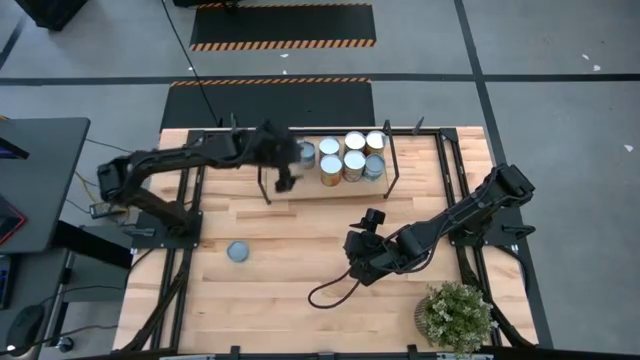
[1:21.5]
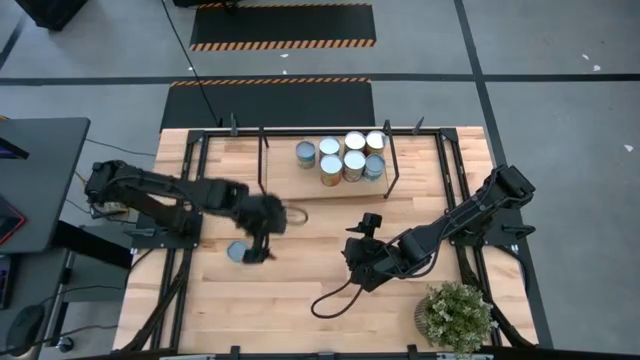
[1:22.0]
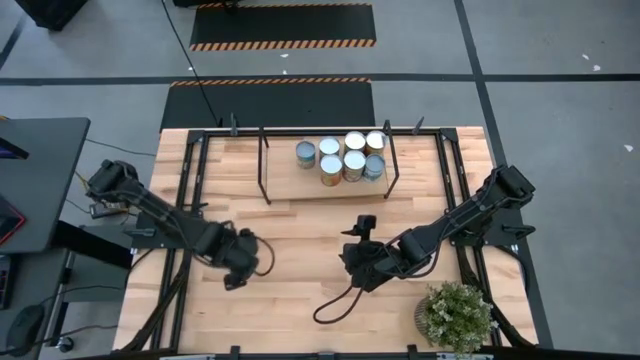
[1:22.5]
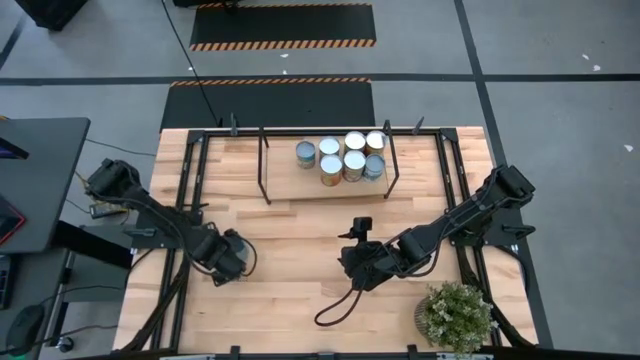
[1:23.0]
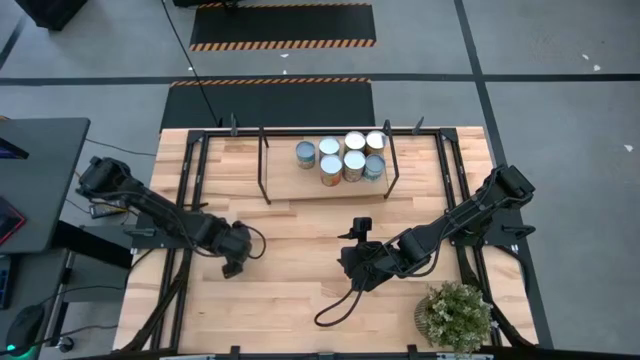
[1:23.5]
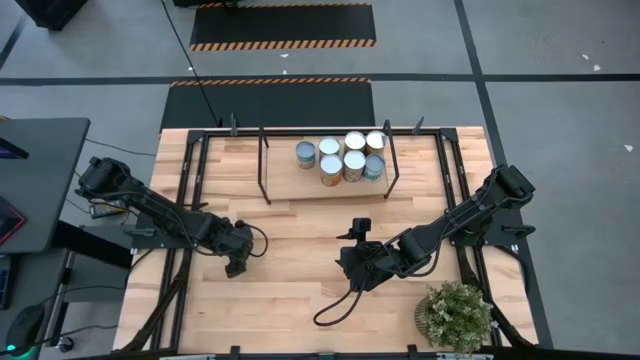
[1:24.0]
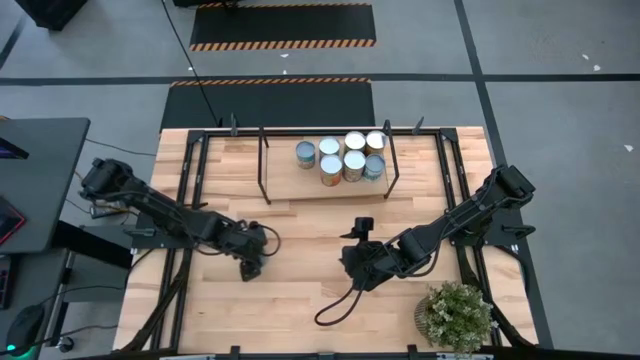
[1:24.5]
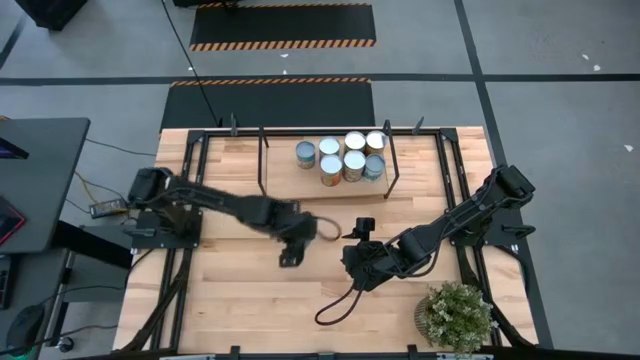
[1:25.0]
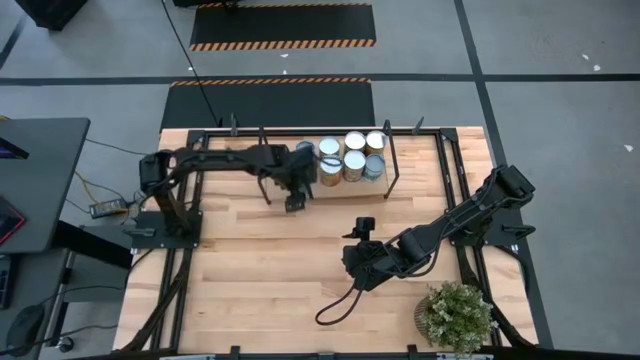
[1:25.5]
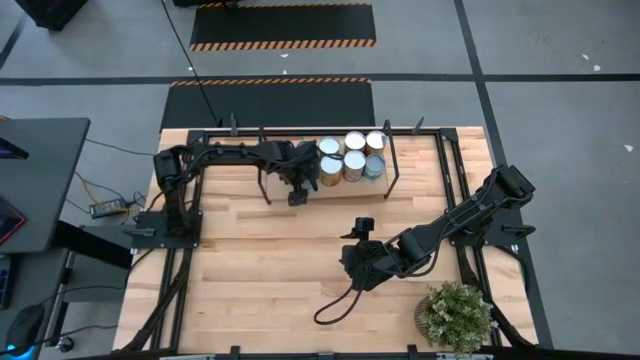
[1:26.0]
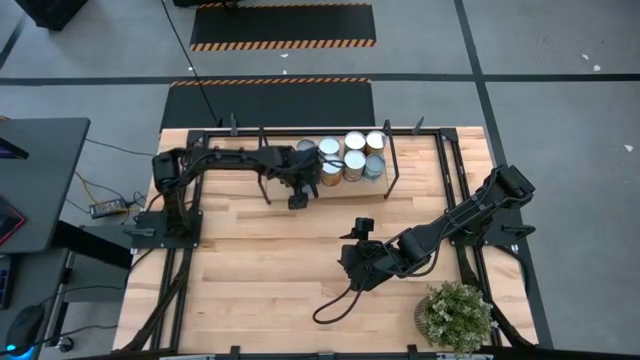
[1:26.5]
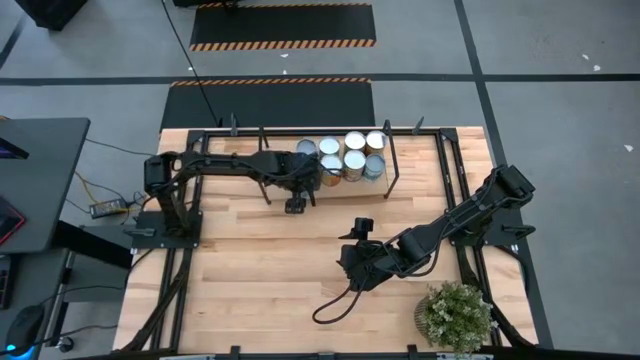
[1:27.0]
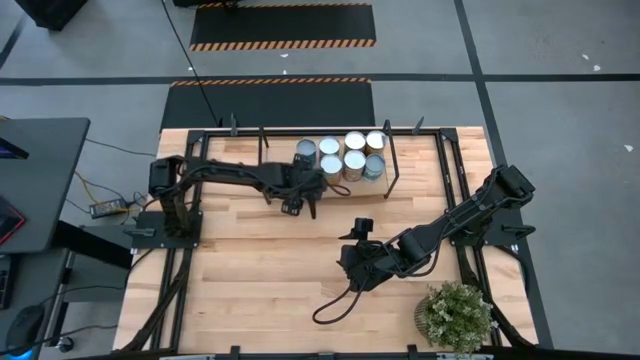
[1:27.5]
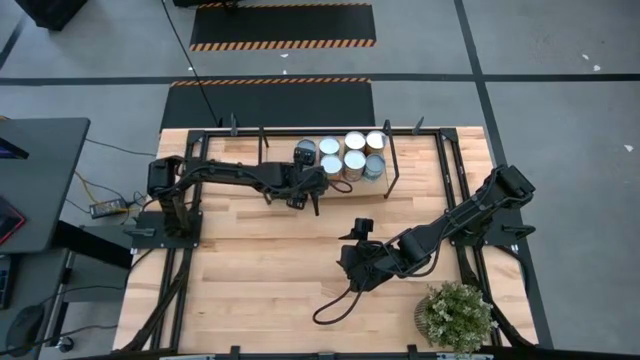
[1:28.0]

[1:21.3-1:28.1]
Task: Pick and place cans onto a shelf
Put the canned tuna on the shelf

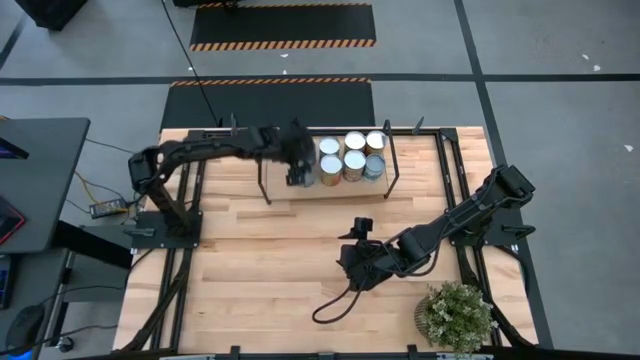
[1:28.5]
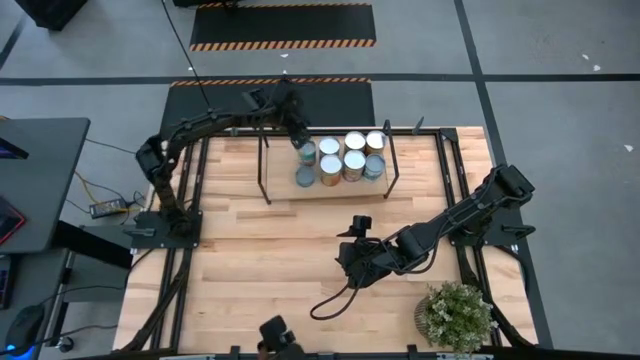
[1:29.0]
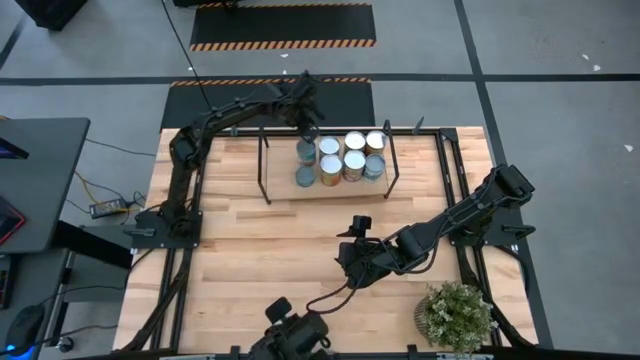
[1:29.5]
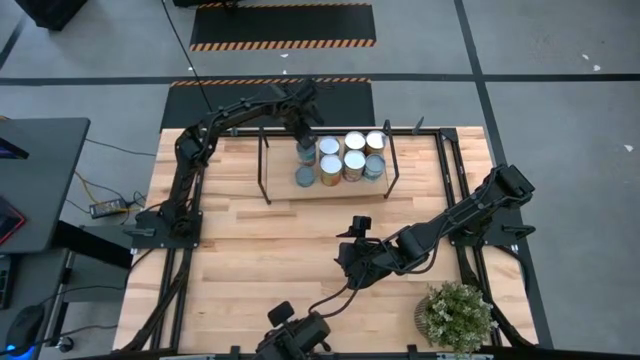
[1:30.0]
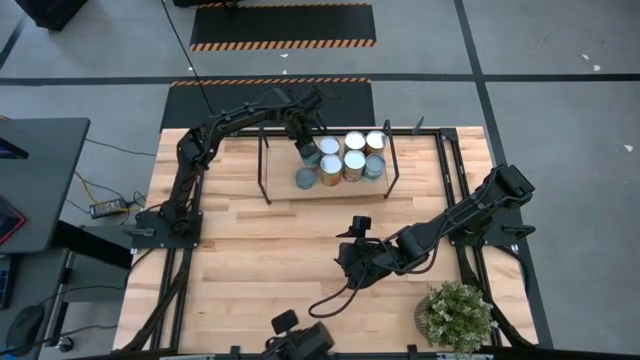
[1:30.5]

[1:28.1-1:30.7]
Adjust the canned chicken soup on the shelf

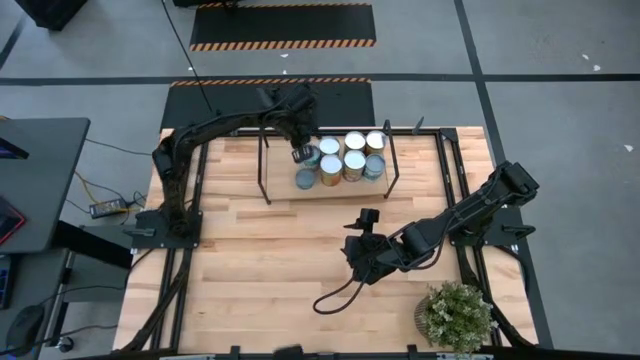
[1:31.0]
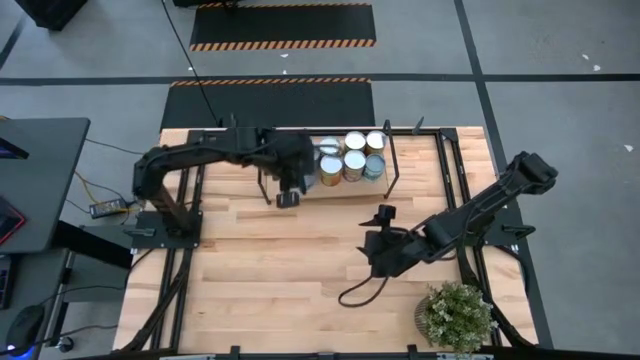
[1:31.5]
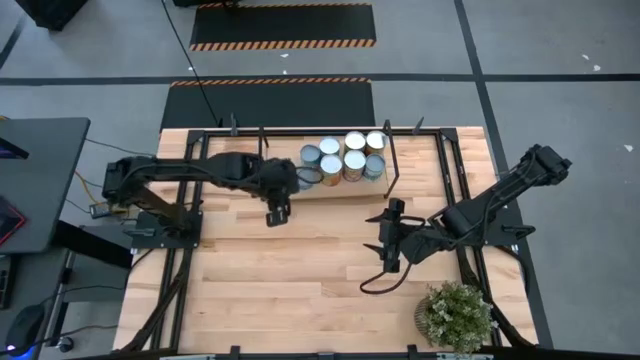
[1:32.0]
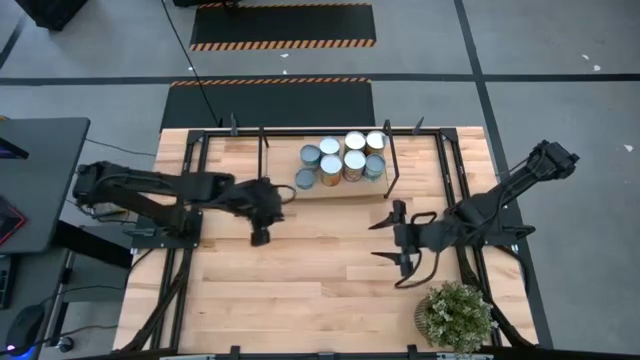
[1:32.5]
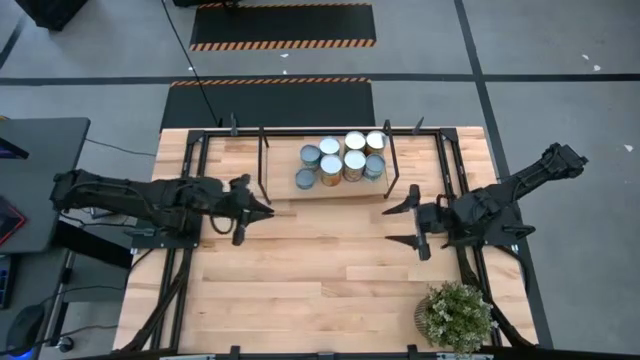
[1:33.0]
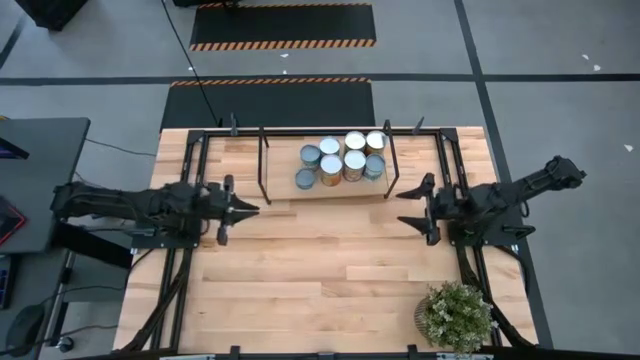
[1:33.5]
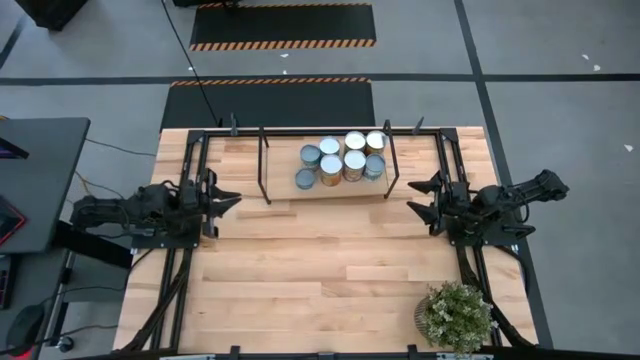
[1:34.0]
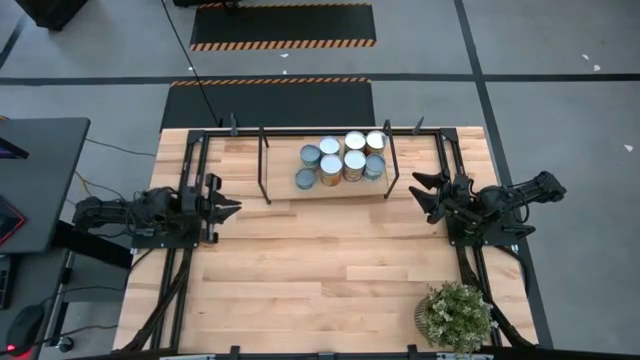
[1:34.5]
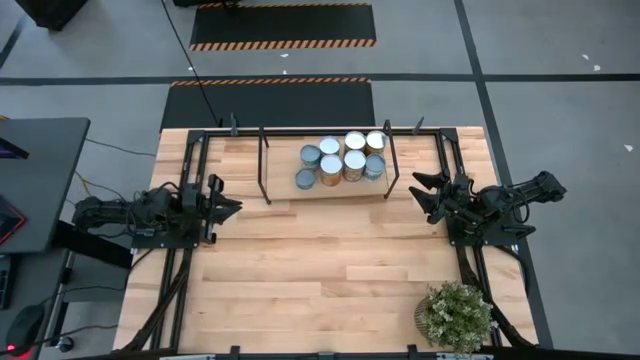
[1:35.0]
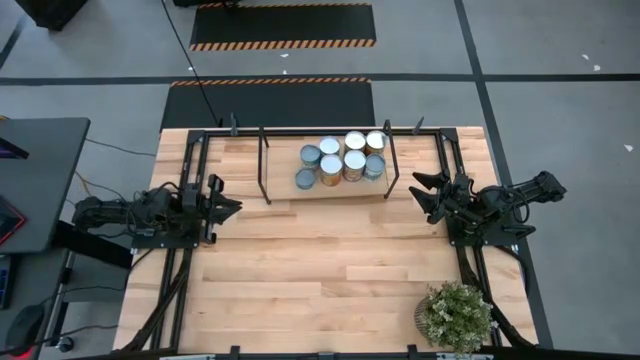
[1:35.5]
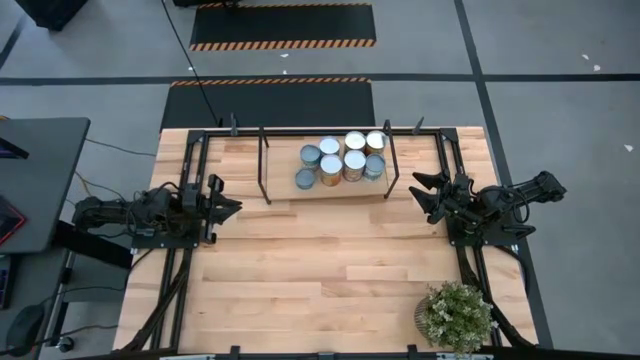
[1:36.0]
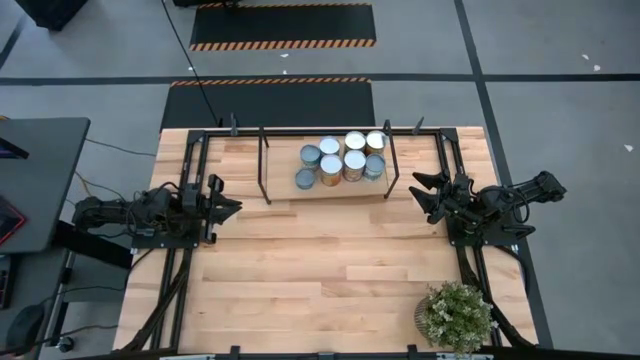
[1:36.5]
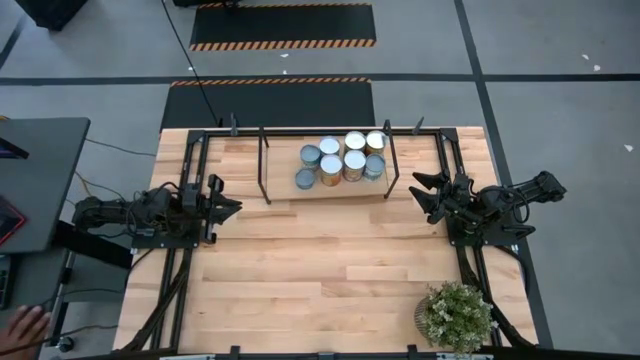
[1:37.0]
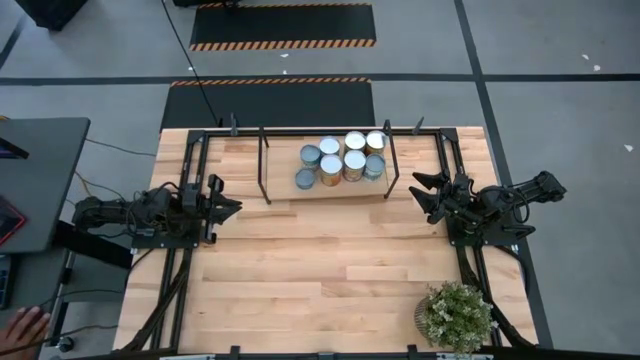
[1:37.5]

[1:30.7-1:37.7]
Return to Home Position

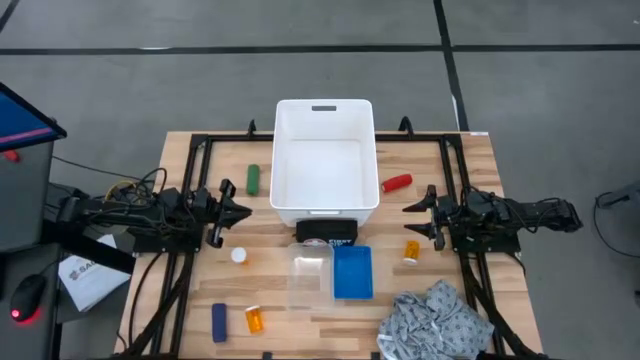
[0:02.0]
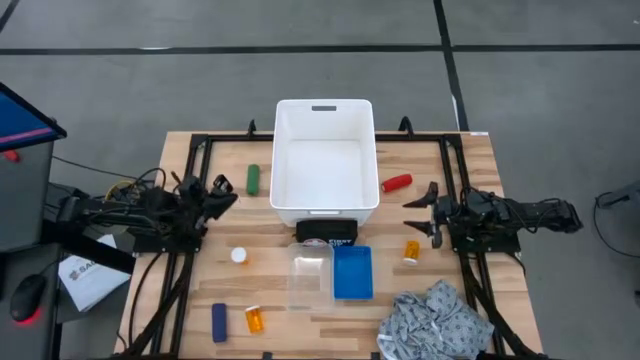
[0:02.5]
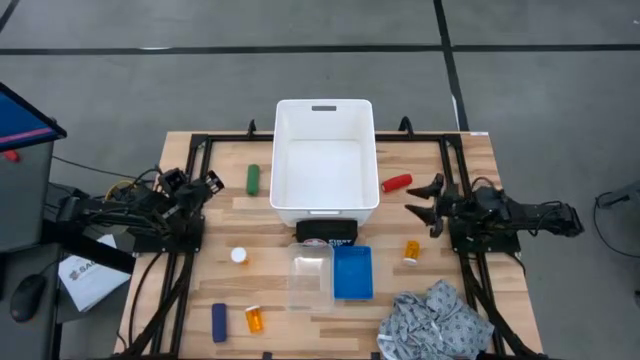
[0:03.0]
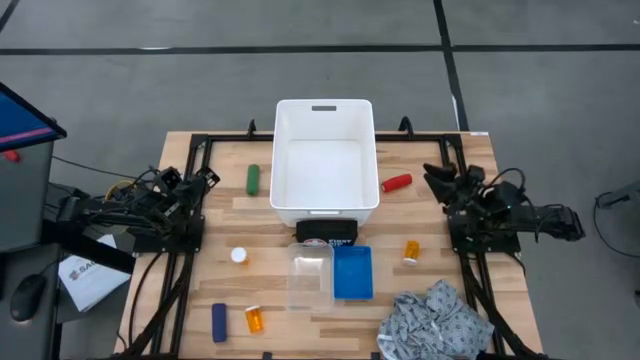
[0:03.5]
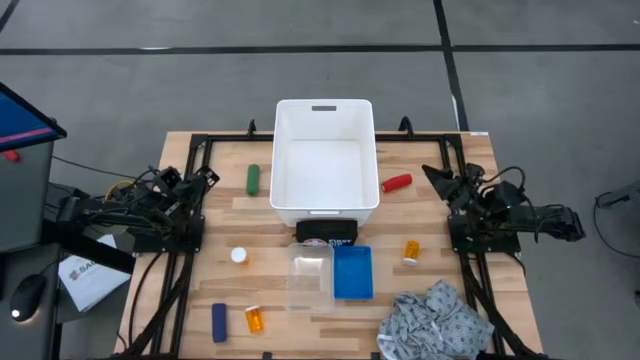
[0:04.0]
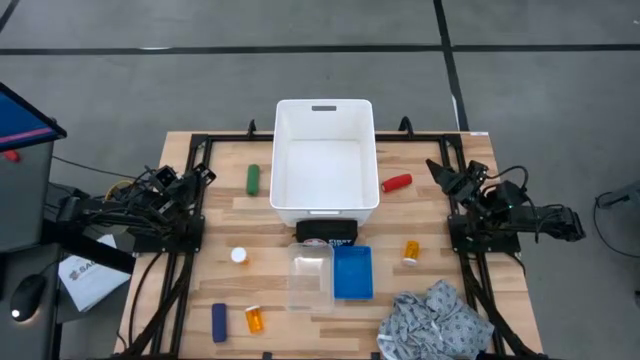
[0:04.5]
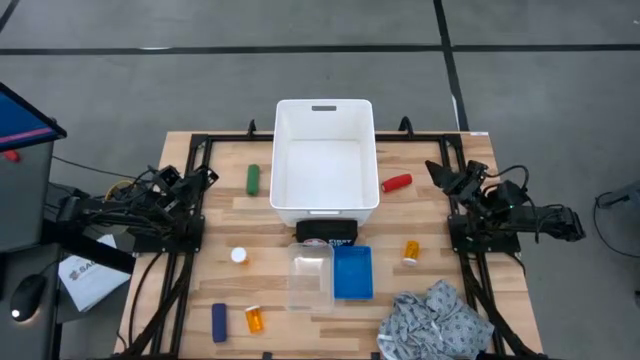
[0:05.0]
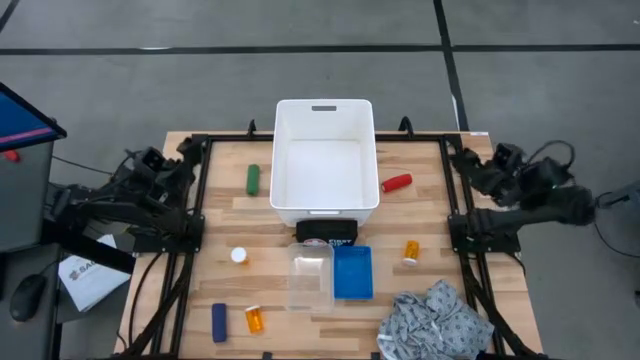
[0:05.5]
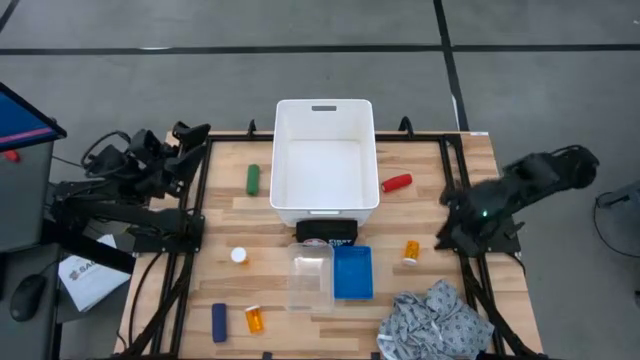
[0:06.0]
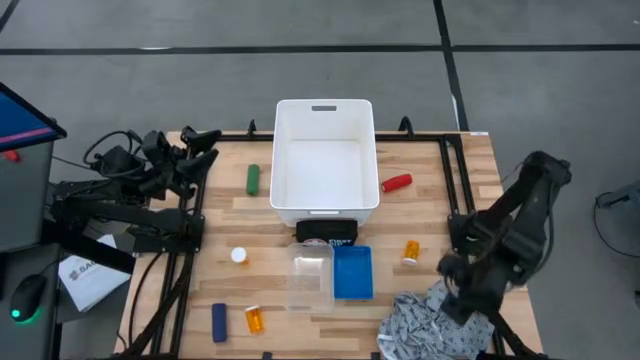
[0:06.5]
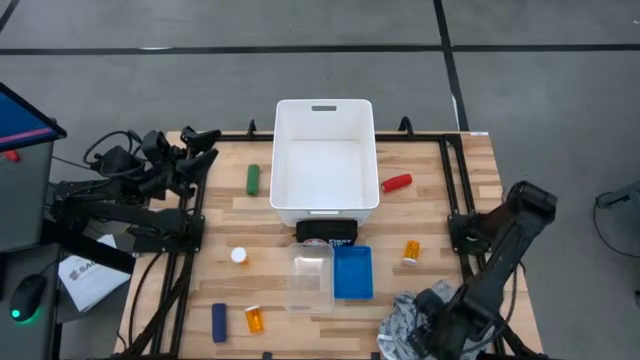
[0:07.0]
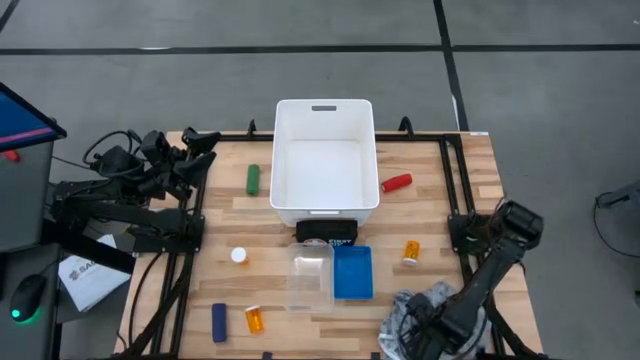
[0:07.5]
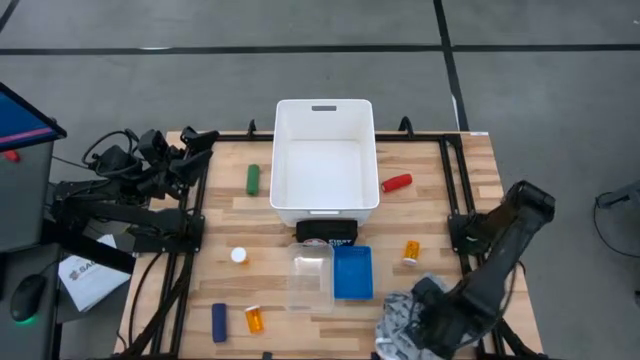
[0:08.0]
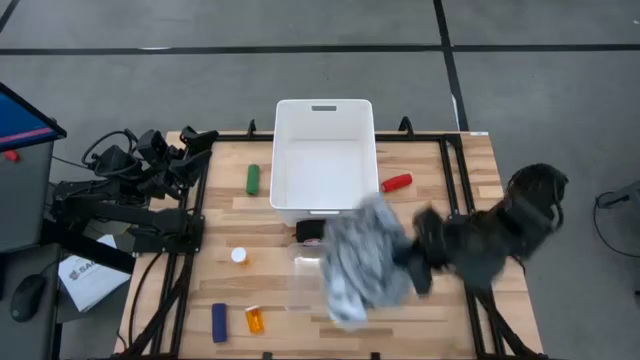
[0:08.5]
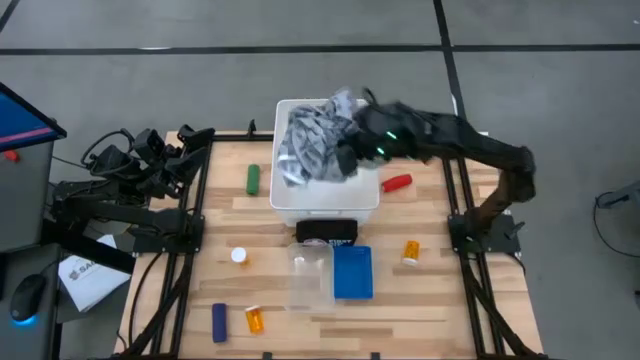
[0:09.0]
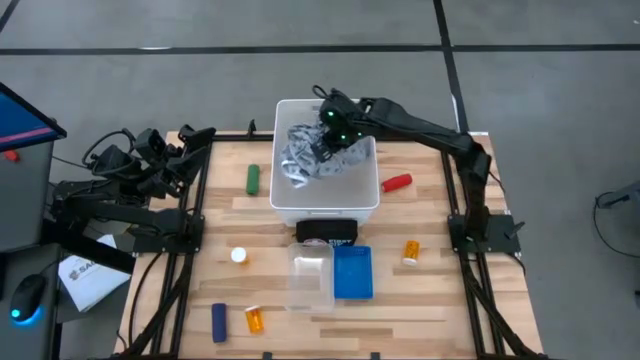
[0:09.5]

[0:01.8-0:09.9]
Task: Pick & place medical supplies in basket/bin
Put the blue patient gown into the white bin
